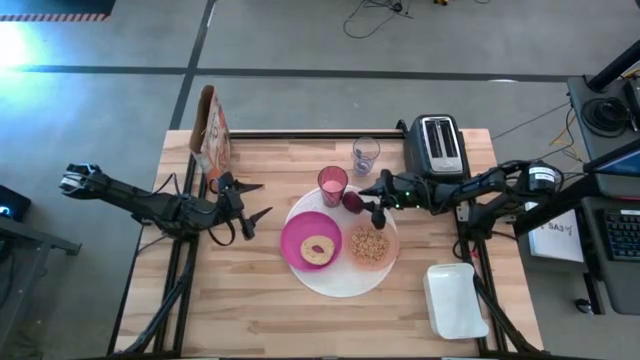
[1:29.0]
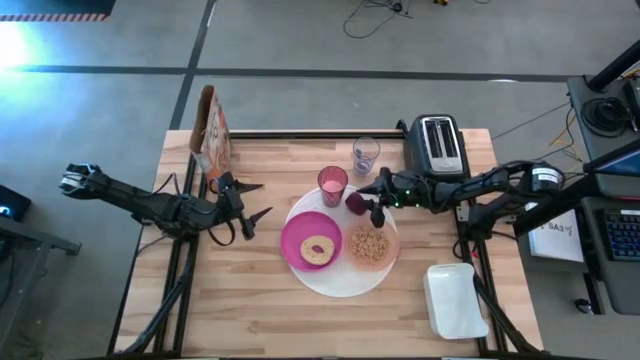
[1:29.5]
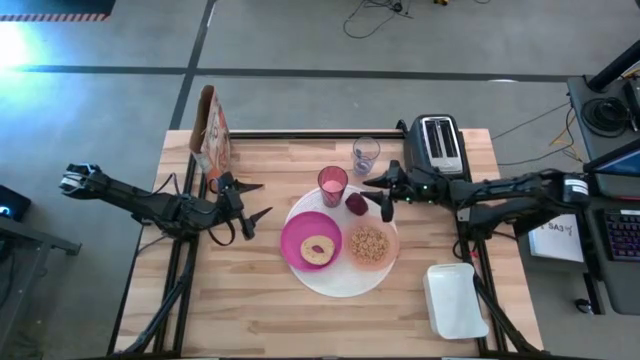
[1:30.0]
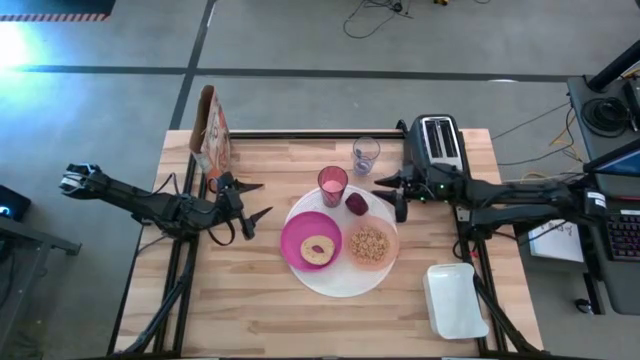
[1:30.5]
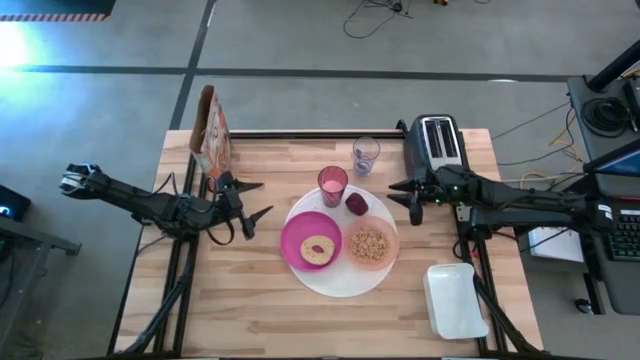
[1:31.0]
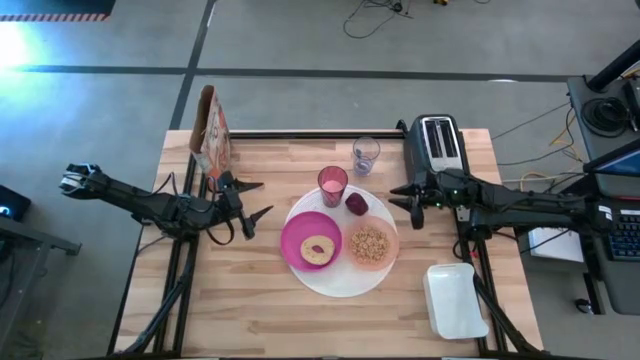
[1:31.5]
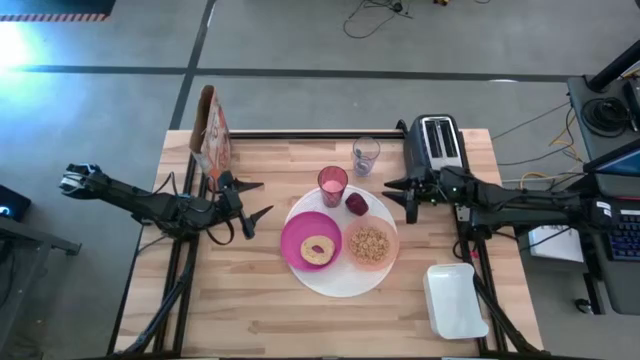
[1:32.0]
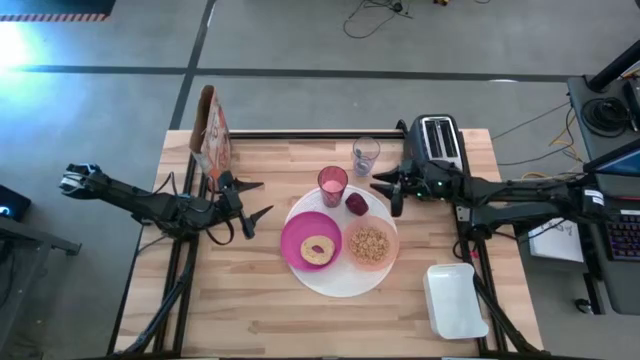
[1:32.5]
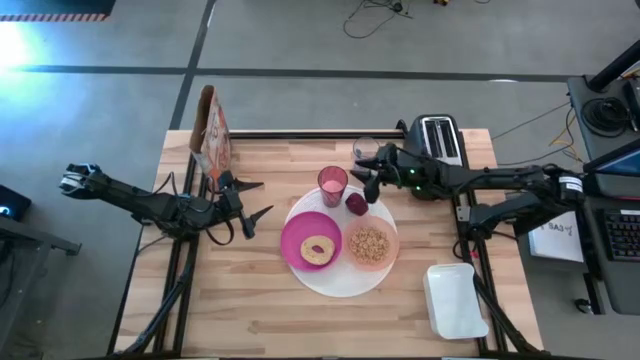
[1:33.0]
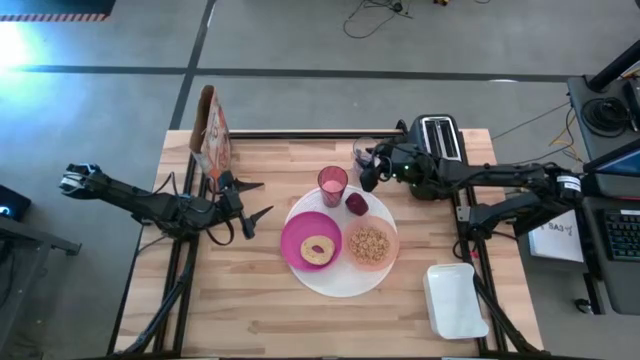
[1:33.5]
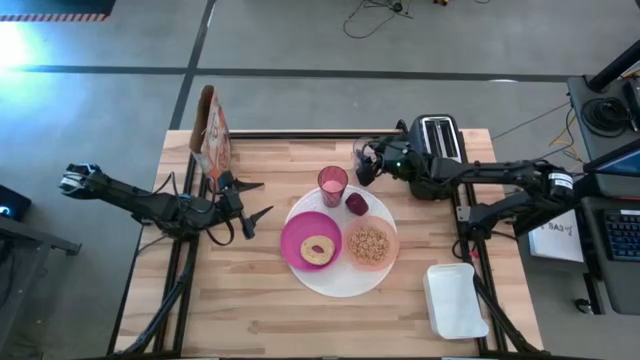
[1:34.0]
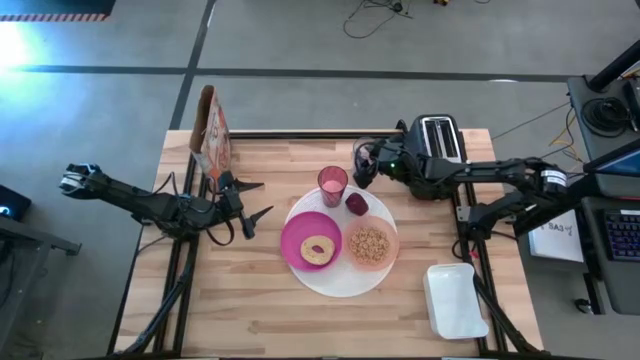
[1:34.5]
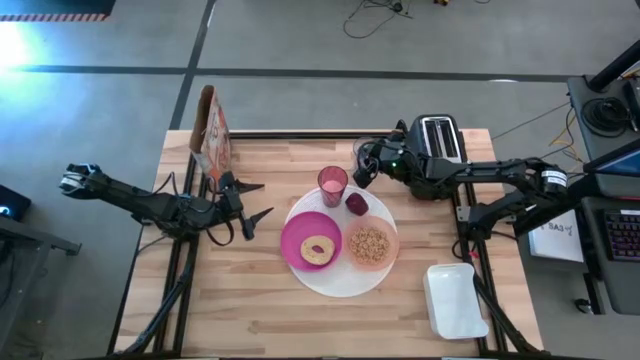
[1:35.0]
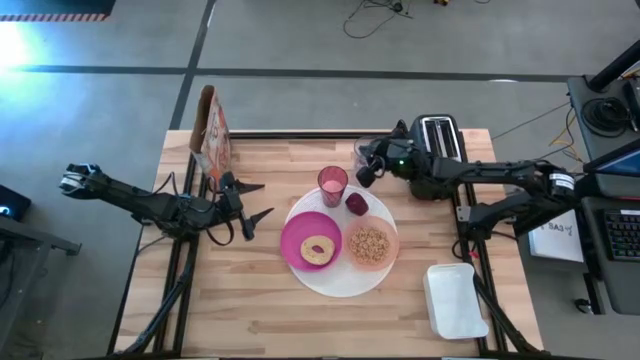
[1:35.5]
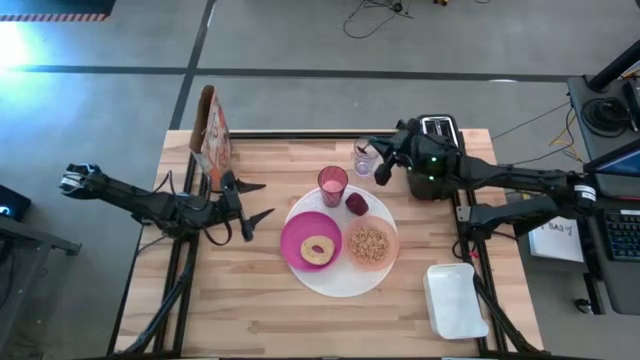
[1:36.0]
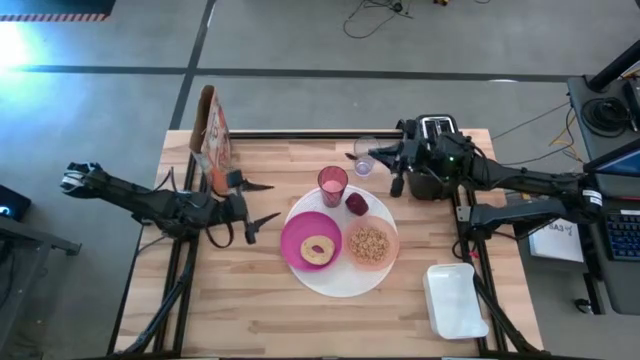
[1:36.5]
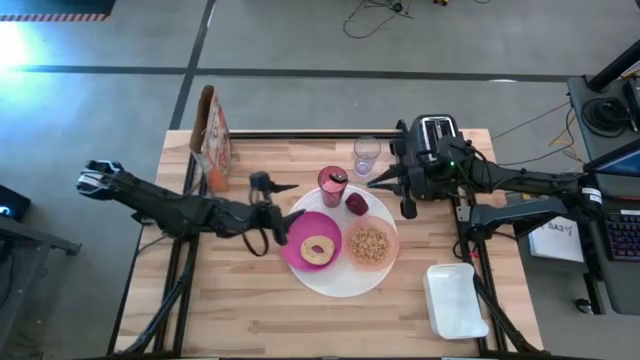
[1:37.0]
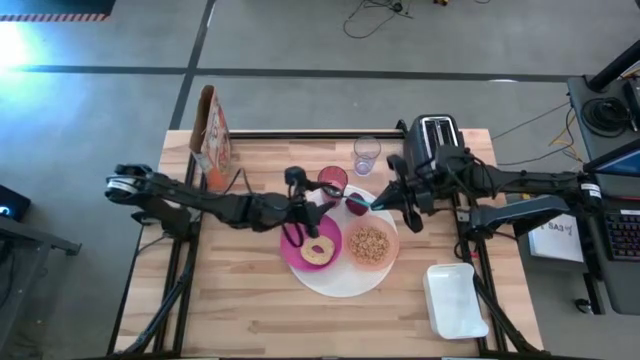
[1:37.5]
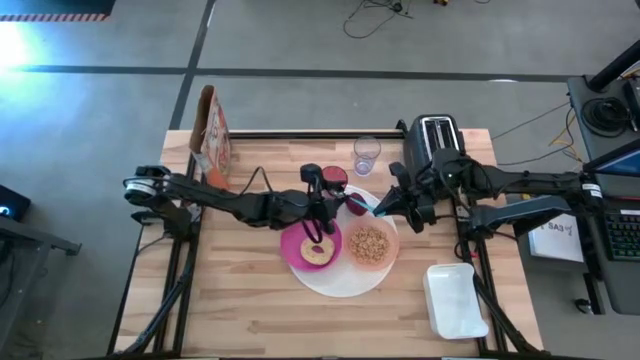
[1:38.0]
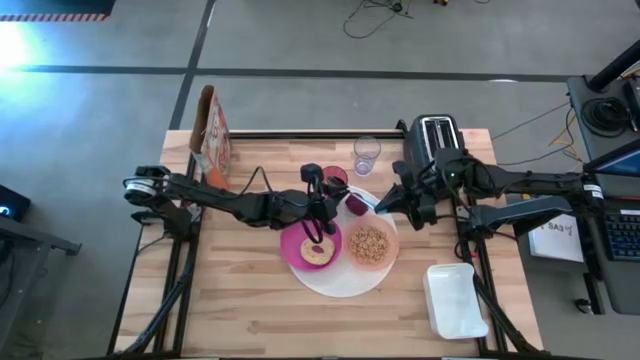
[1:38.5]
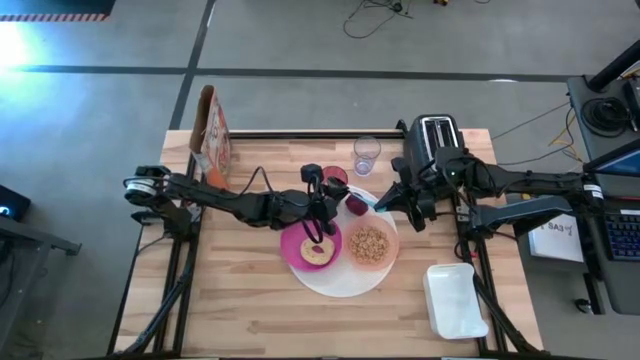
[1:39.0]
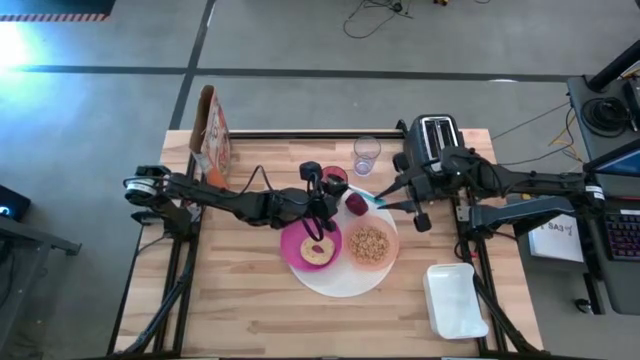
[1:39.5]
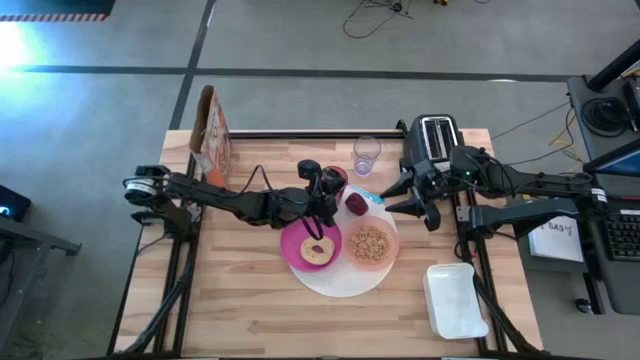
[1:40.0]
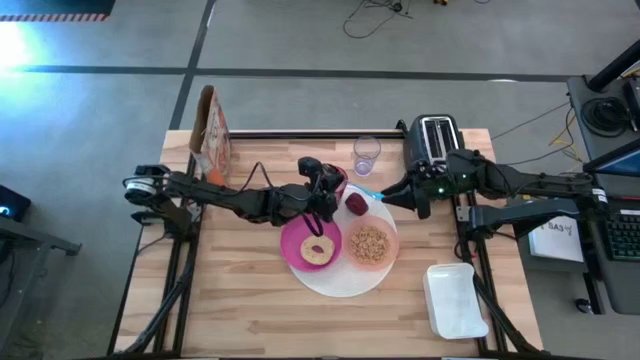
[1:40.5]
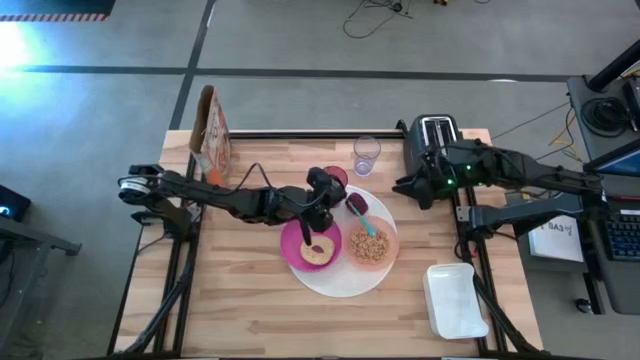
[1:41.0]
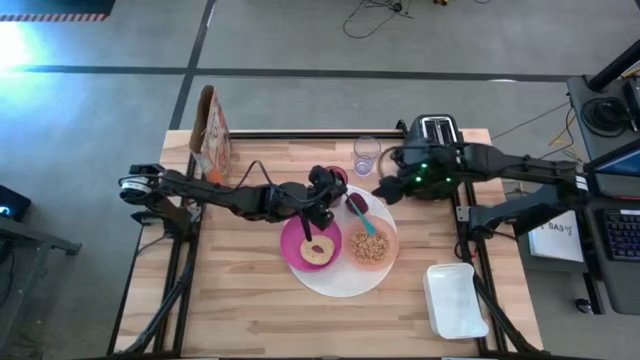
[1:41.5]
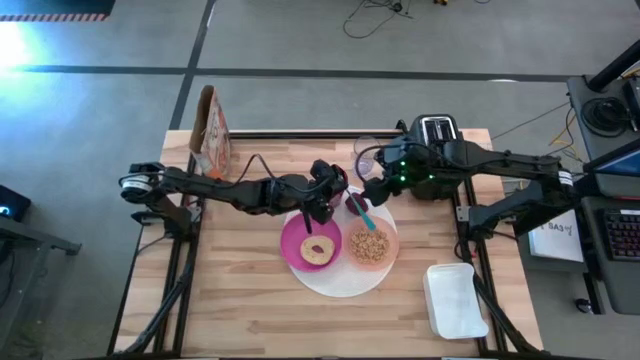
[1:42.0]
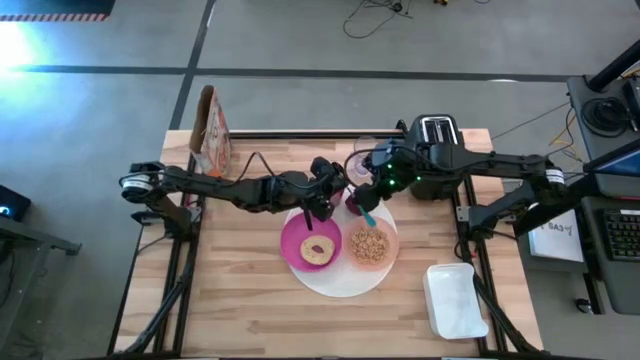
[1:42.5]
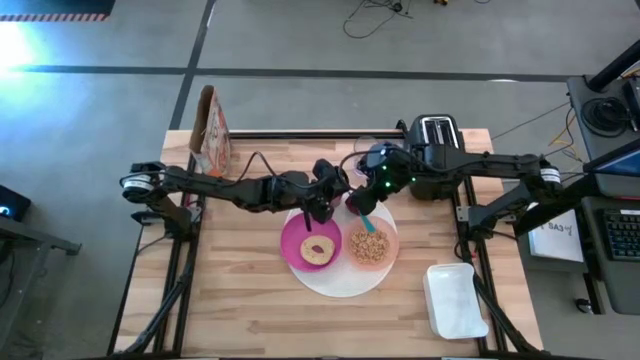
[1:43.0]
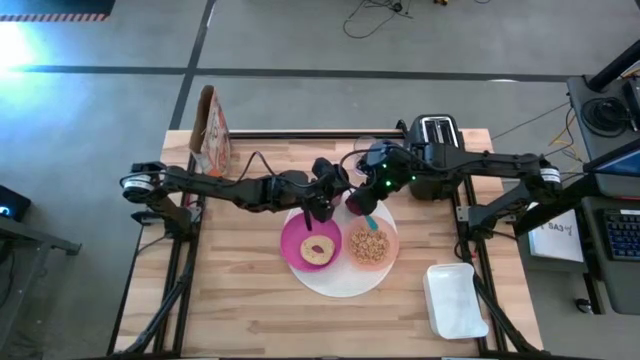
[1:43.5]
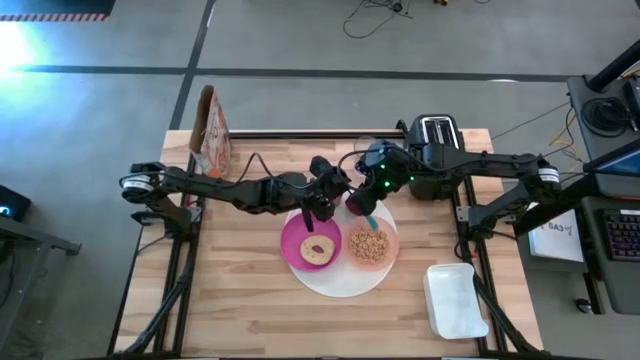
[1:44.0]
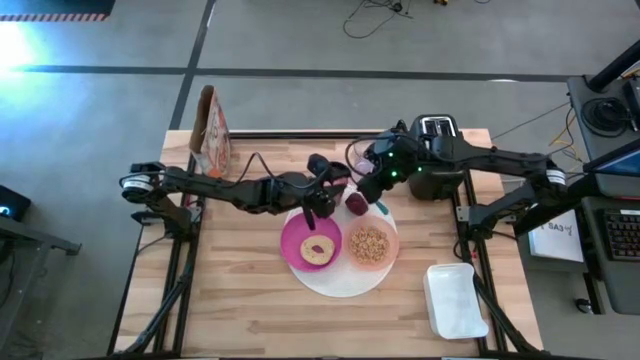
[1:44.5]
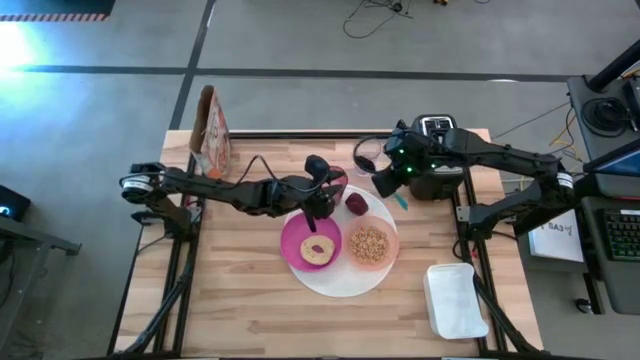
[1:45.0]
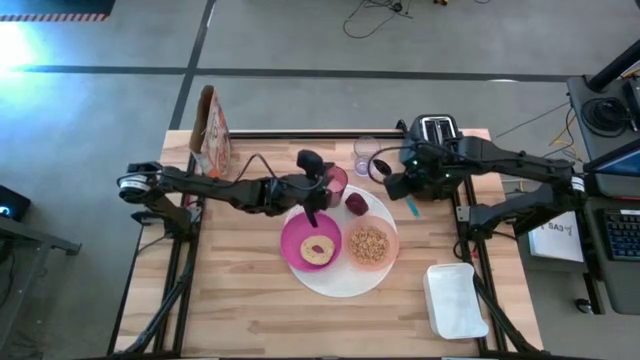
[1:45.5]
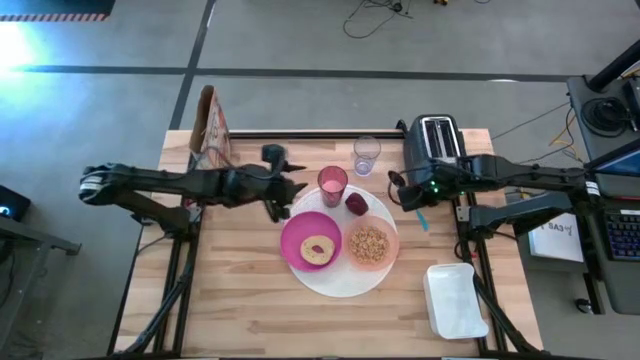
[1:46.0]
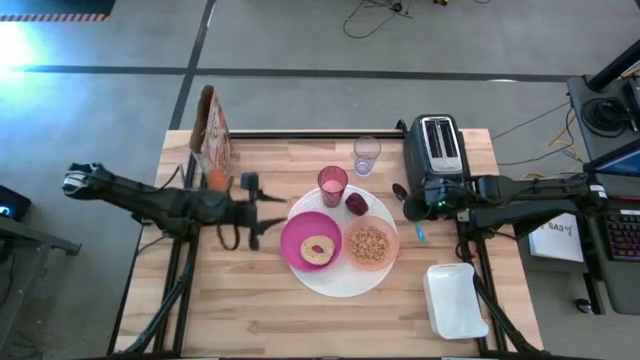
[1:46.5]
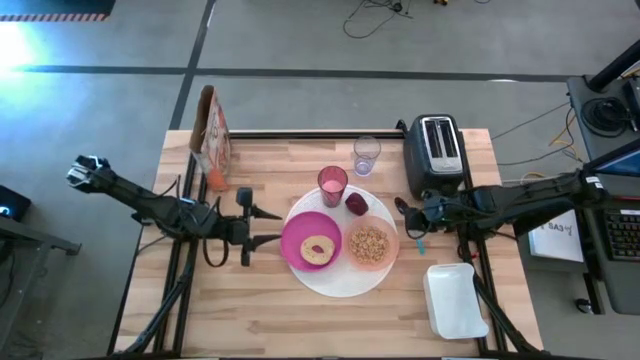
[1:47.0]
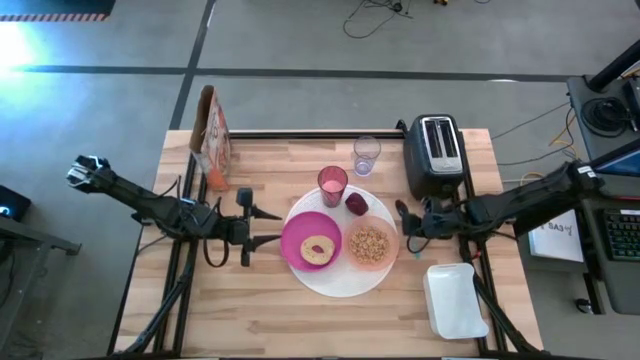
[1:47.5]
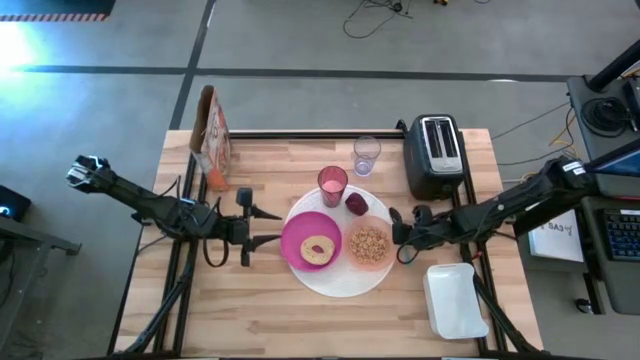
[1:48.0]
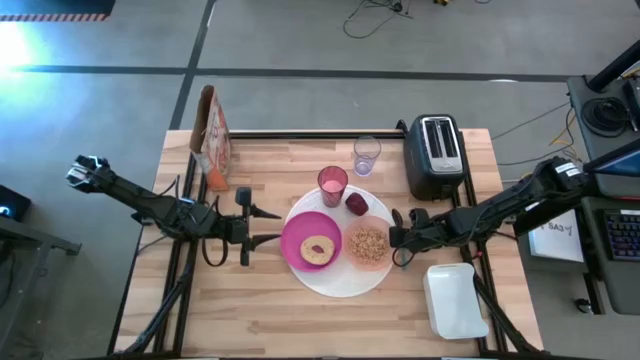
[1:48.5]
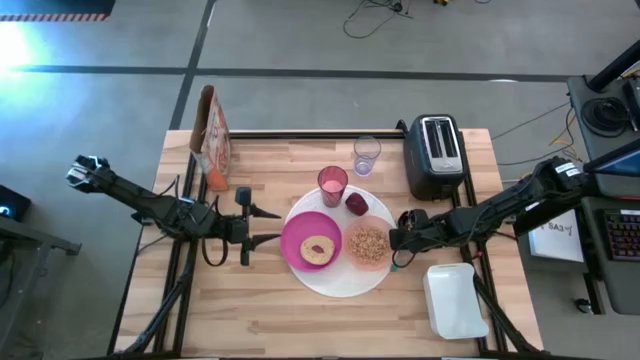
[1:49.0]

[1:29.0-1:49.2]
Task: Arrange a breakfast setting
Put the blue spoon to the right side of the white table mat
